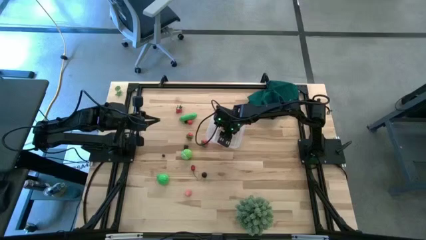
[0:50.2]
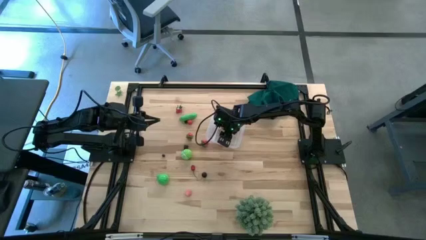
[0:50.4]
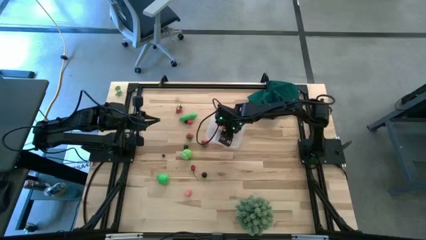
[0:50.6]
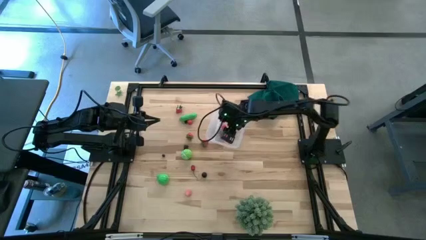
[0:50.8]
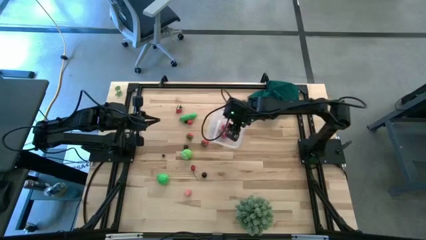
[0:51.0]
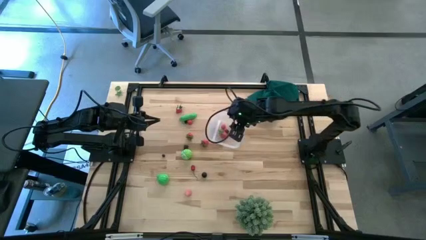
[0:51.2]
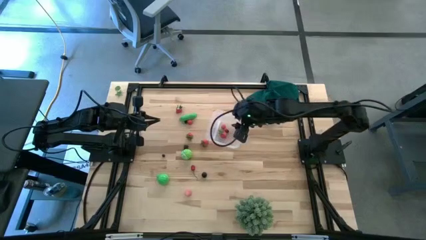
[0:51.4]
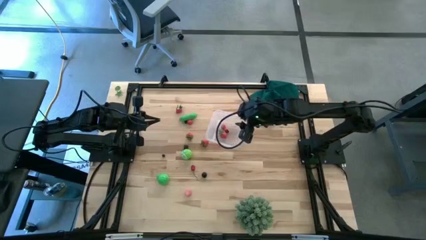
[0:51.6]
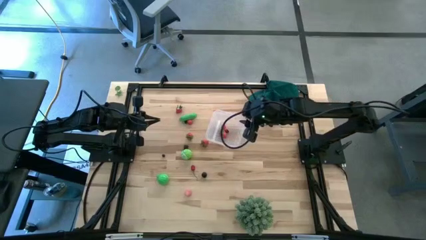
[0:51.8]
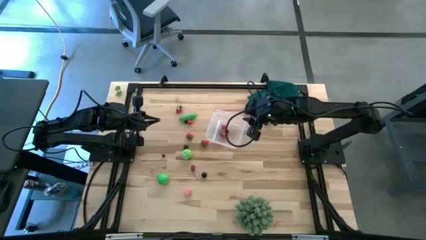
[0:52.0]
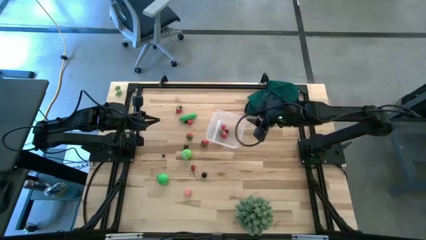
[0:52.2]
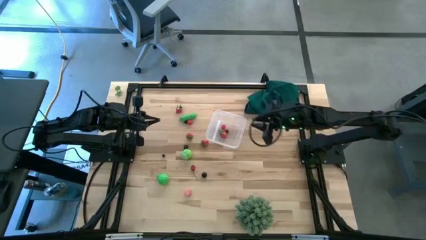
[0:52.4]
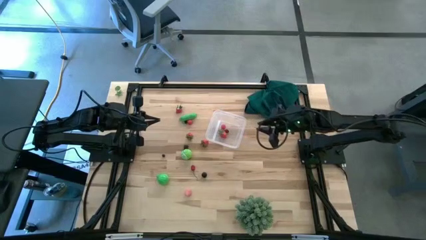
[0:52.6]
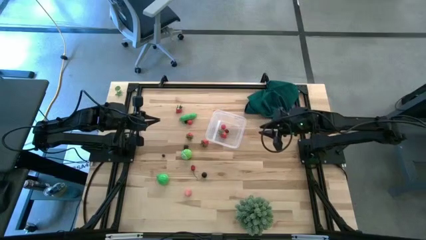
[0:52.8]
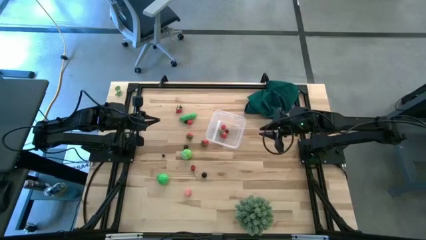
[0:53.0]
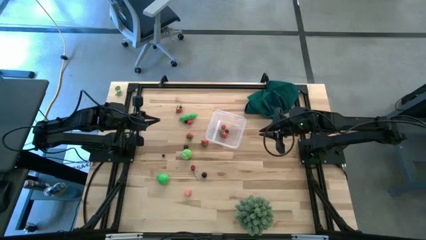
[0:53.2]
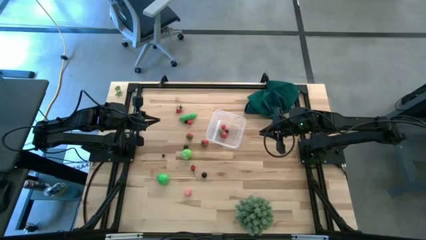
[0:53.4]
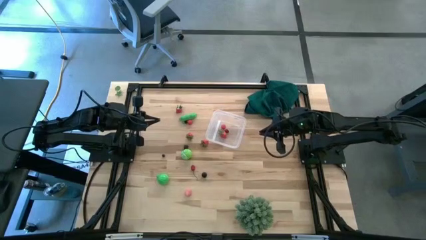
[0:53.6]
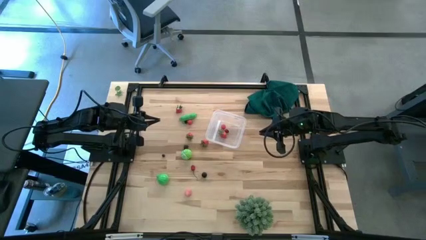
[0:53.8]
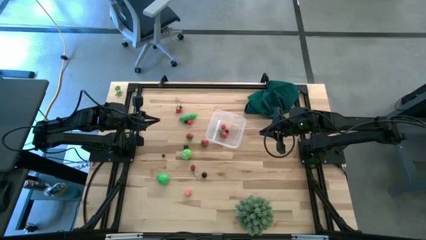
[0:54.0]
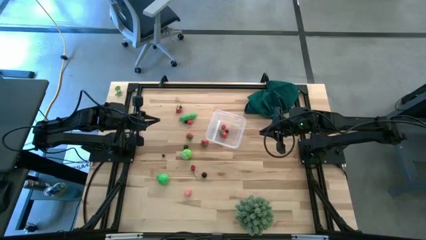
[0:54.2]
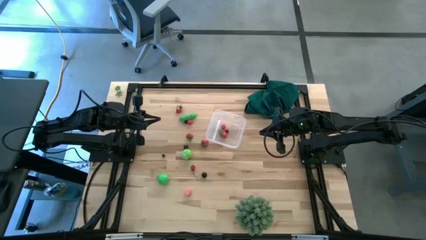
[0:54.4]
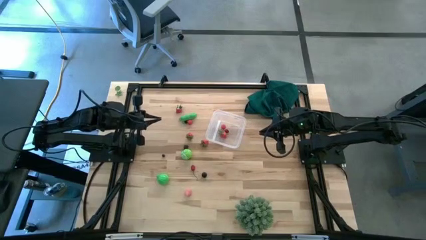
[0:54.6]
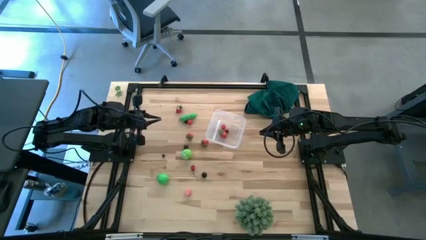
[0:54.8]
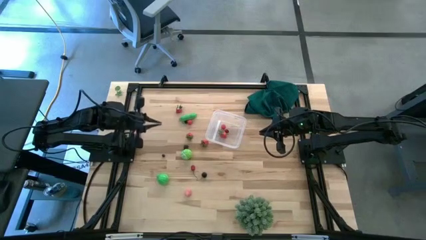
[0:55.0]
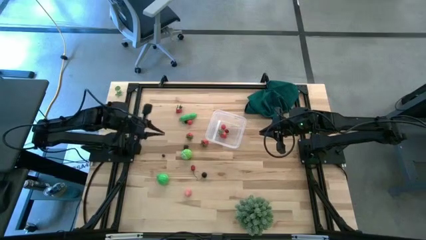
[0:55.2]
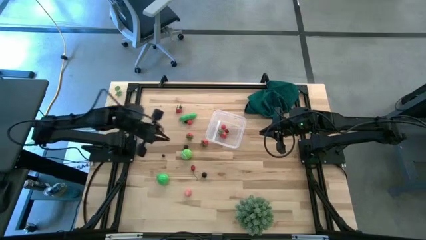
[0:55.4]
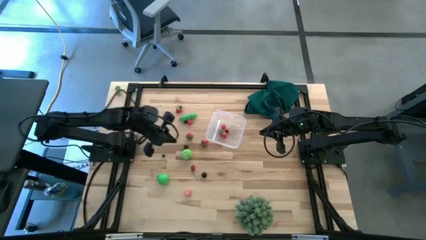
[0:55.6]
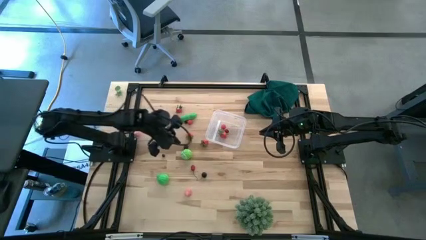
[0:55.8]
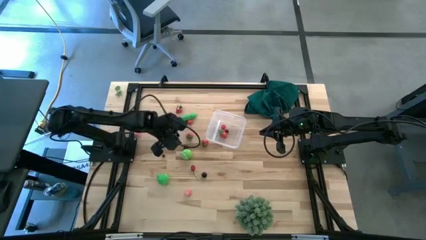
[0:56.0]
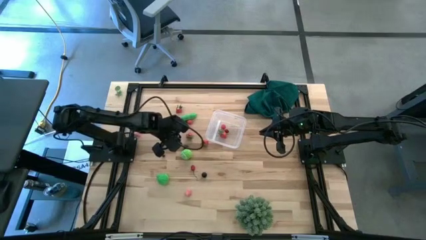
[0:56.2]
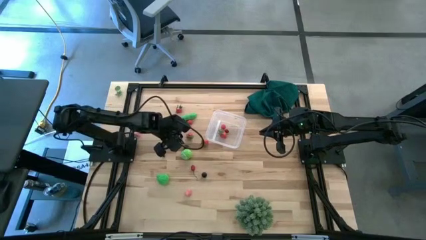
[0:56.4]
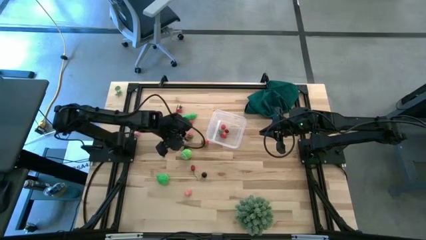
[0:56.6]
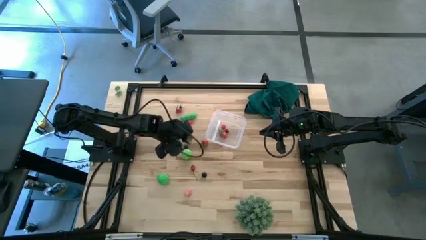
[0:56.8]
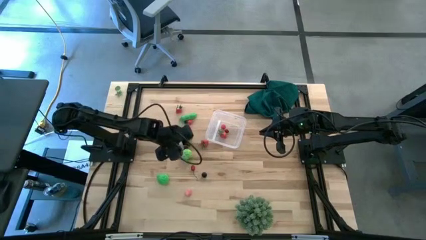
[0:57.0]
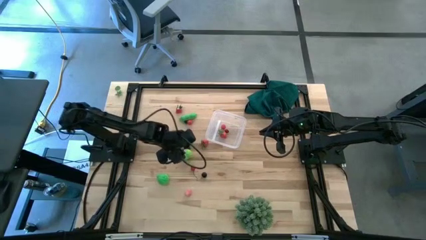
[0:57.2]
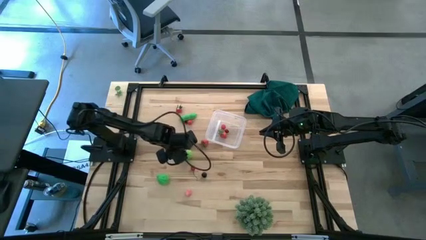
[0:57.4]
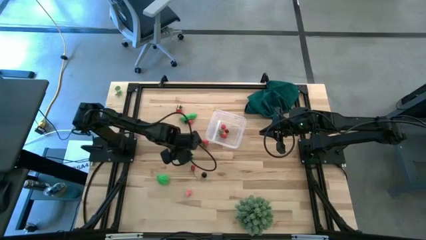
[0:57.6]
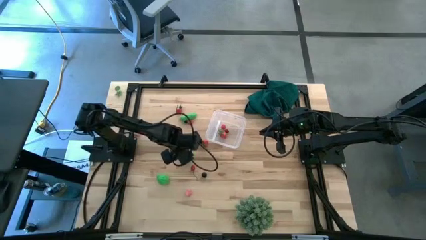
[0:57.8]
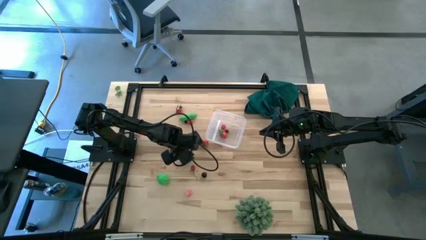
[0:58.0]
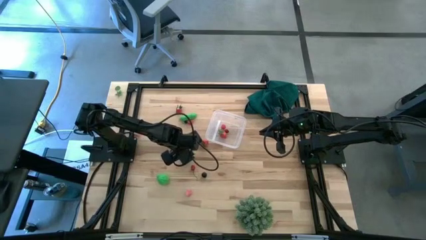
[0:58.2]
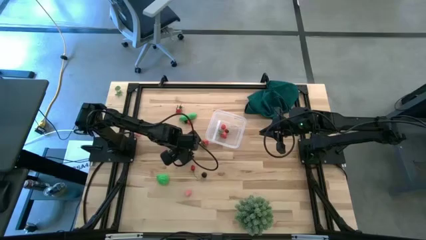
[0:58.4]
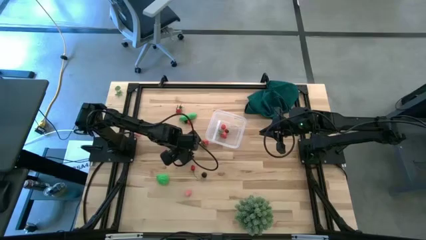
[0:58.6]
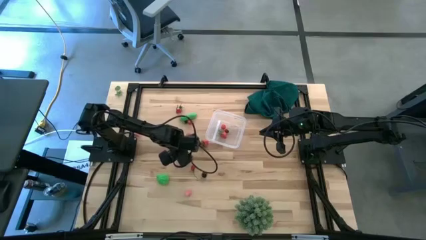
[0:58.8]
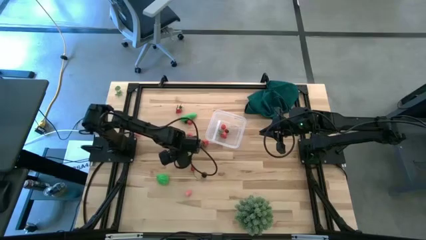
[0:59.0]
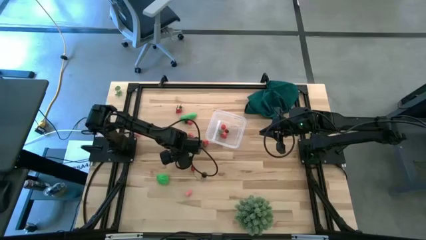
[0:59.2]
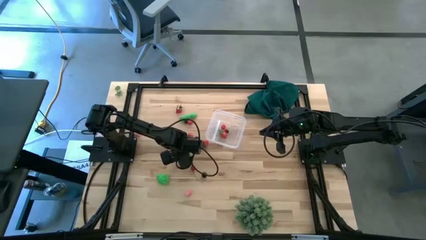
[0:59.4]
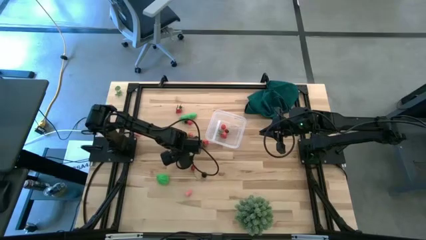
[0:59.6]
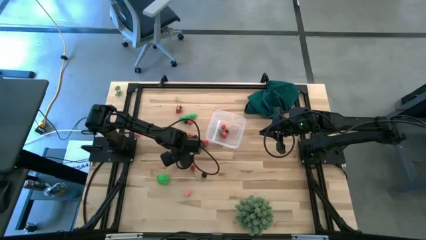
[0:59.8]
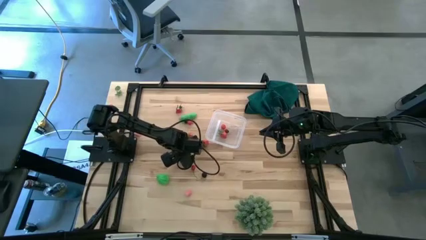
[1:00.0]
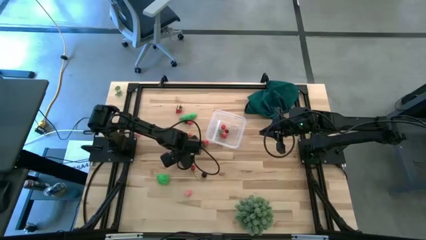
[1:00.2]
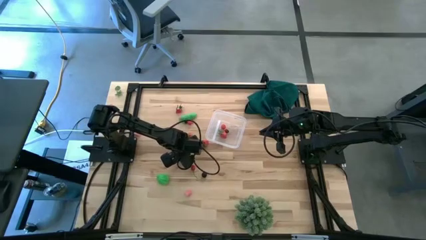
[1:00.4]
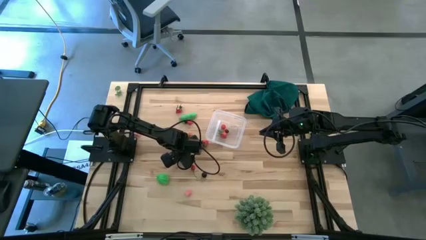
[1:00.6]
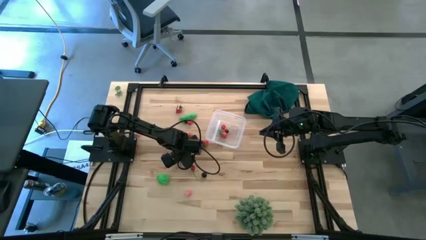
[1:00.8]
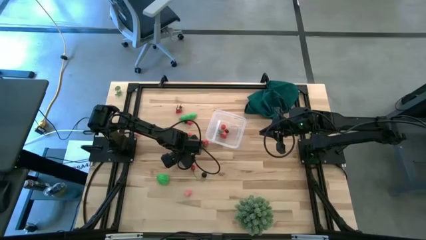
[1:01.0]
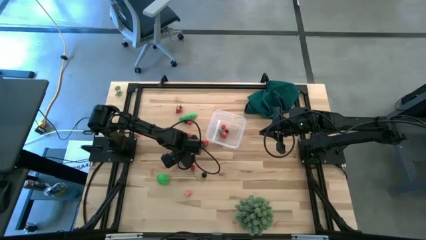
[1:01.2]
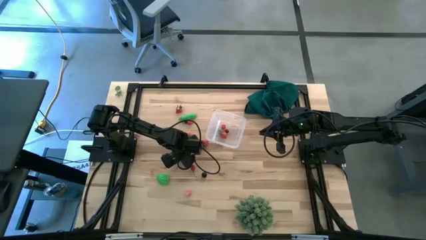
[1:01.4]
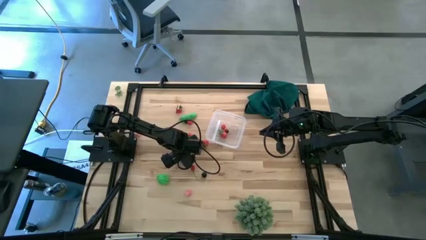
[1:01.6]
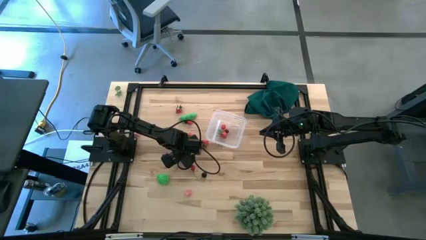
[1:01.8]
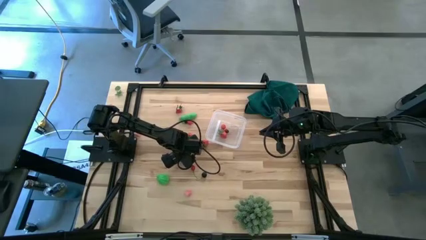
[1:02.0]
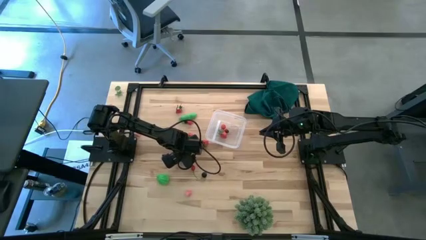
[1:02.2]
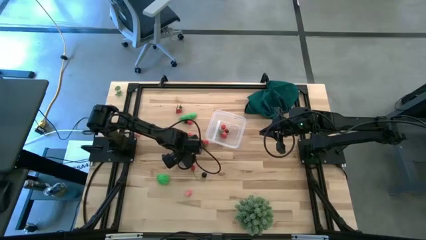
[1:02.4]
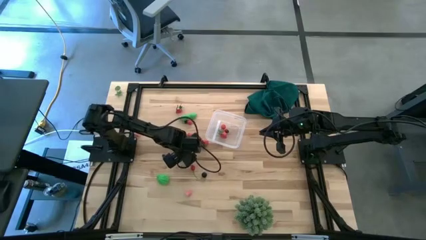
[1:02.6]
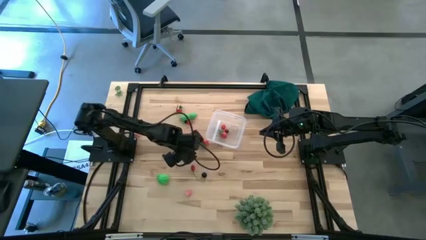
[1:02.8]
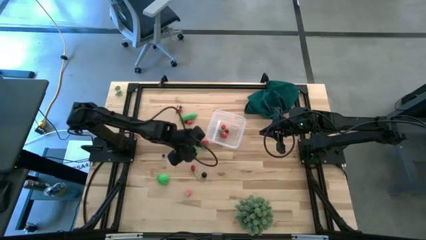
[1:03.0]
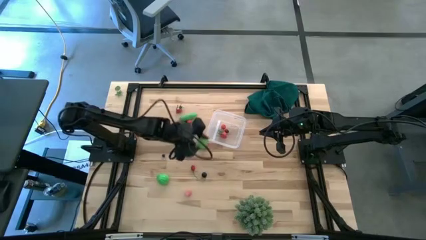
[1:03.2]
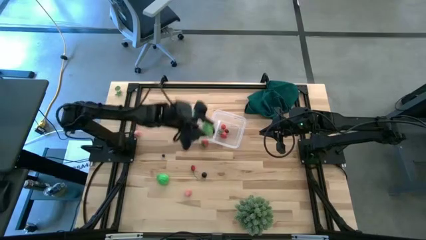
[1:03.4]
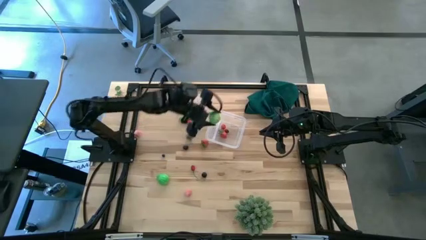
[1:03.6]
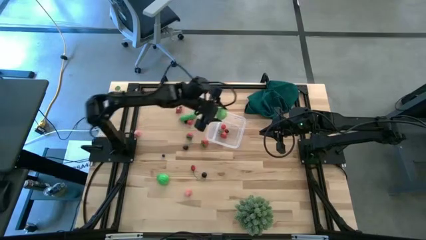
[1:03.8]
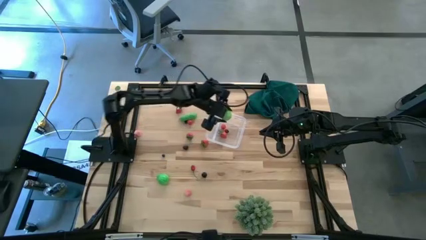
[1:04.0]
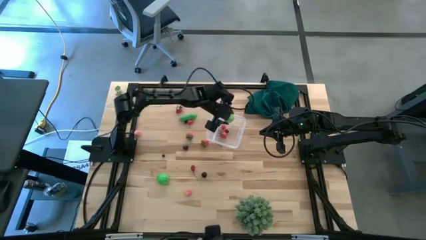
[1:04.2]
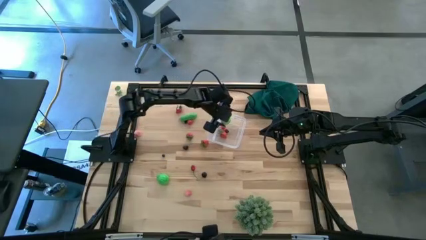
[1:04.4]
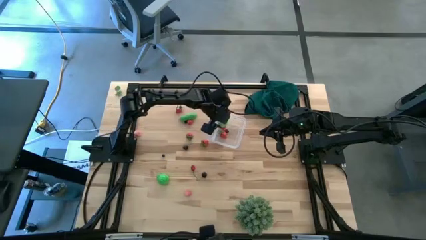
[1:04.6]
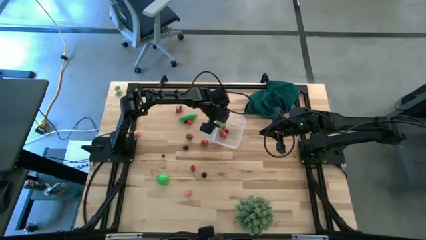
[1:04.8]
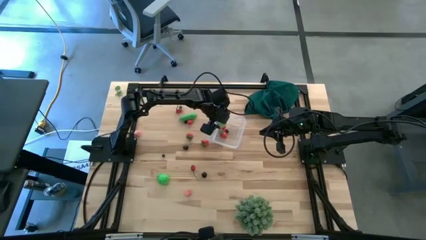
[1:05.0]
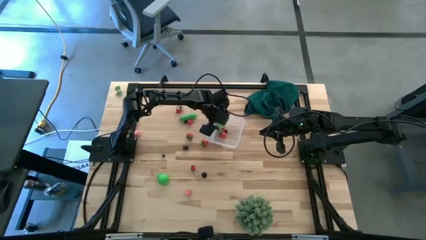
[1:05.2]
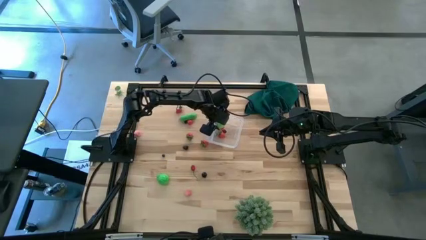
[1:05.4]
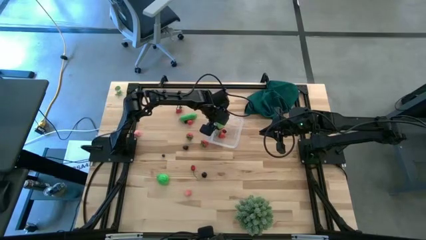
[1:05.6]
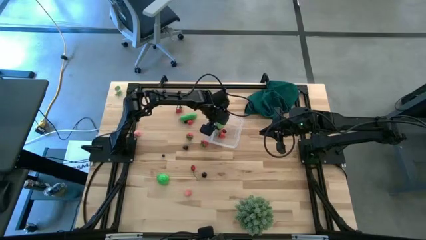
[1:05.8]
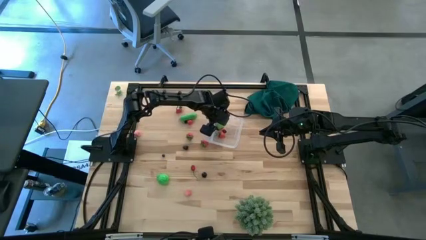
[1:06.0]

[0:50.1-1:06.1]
Task: Pick and placing Produce into tupperware
Put the green cabbage into the transparent bin

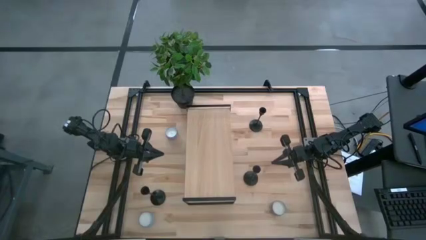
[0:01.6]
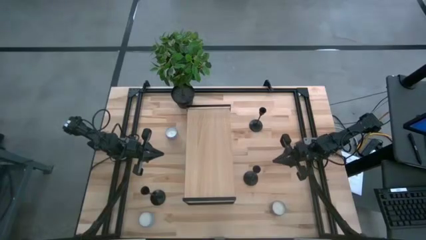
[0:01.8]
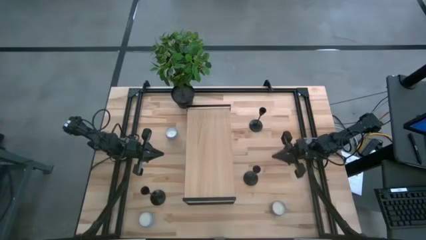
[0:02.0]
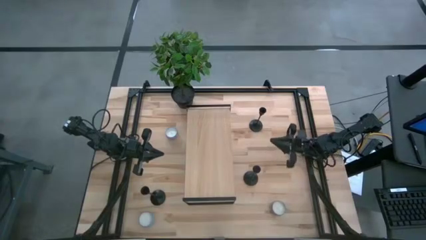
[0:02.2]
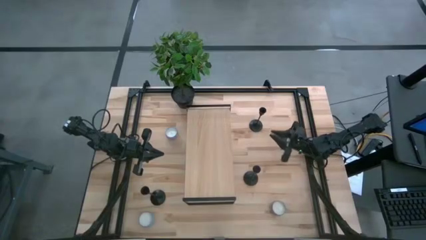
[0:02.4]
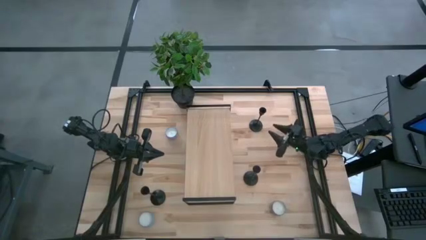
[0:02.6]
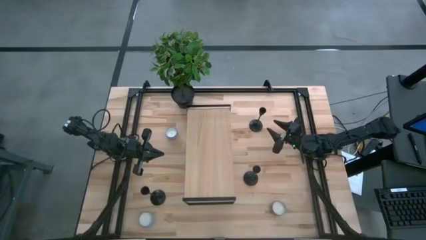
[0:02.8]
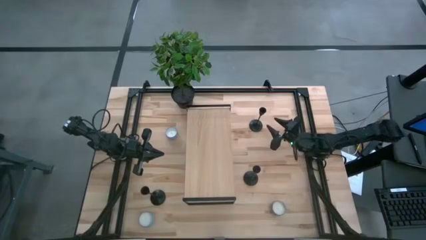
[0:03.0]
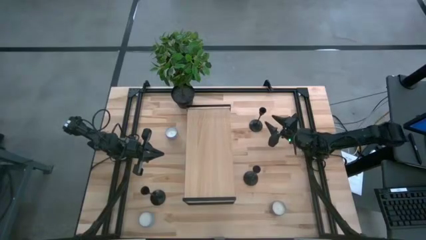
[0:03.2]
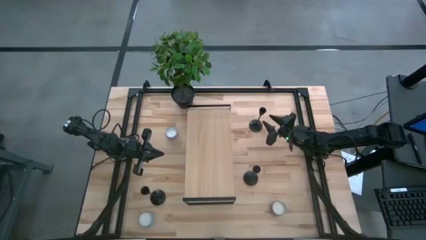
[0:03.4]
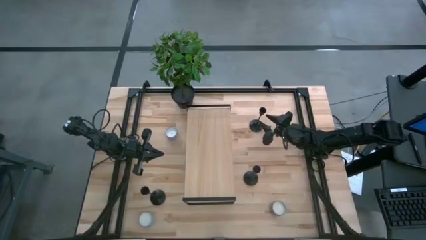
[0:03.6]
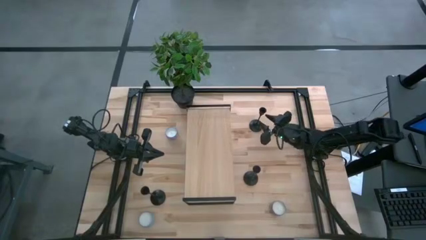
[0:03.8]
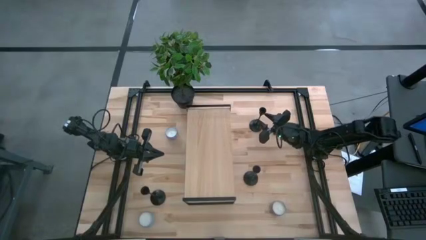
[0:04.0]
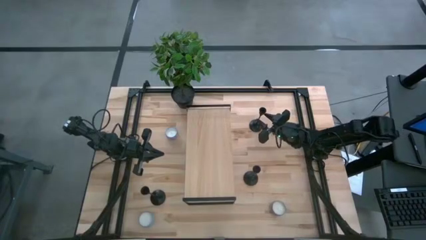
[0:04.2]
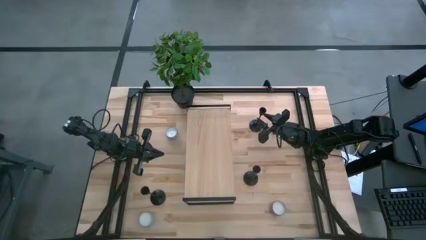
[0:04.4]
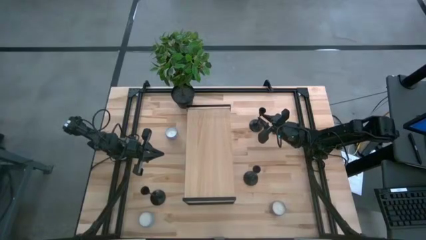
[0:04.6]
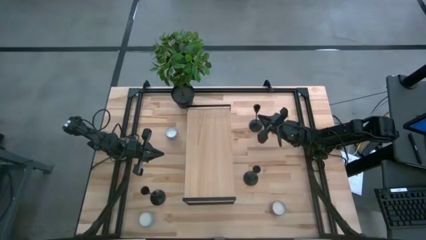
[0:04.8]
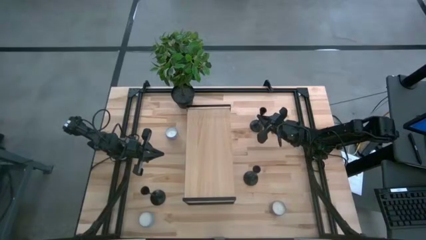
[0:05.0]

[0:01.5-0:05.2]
Task: Pick & Place candle stick holders
Put the top right black candle holder on the shelf
